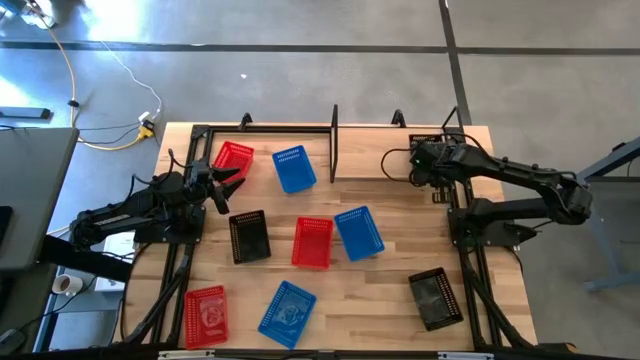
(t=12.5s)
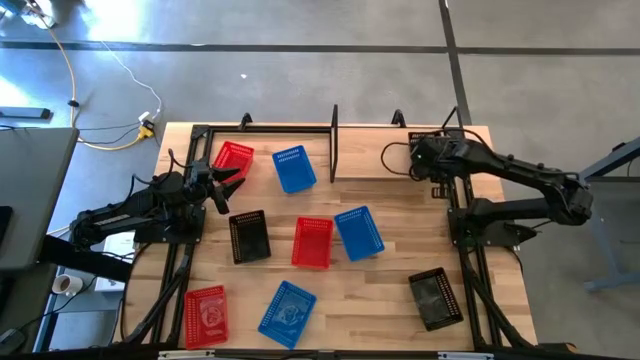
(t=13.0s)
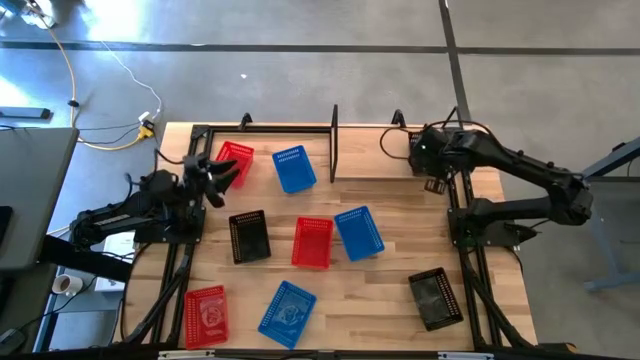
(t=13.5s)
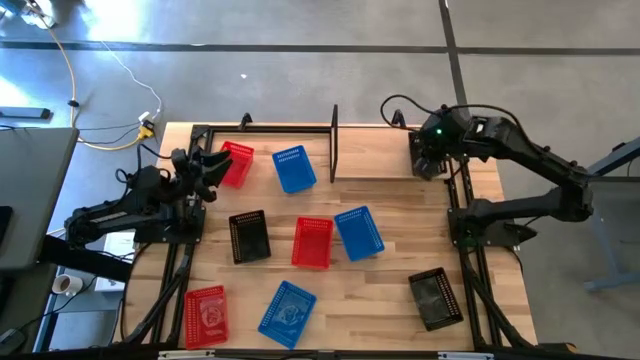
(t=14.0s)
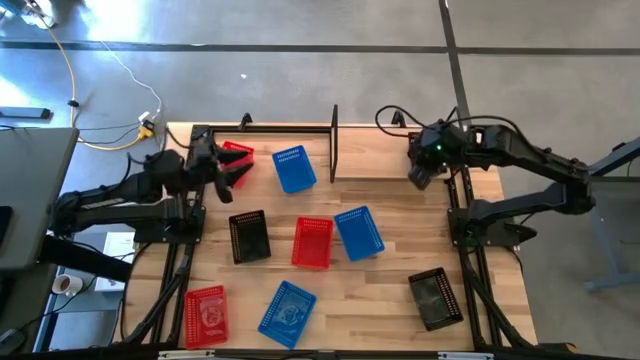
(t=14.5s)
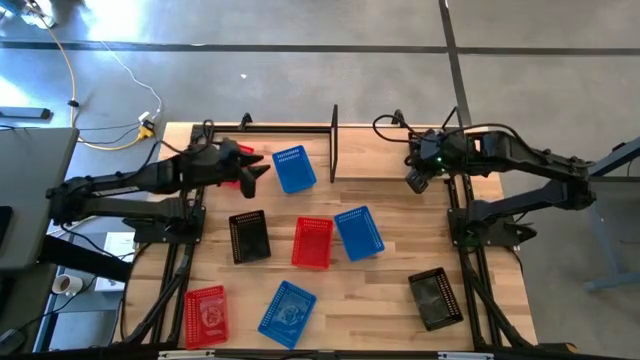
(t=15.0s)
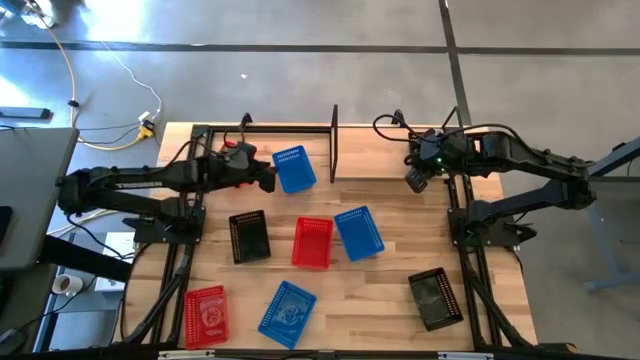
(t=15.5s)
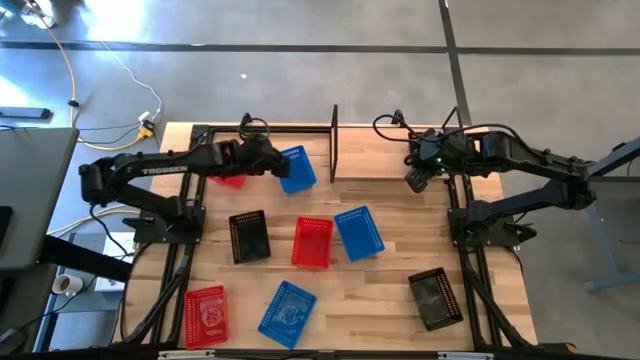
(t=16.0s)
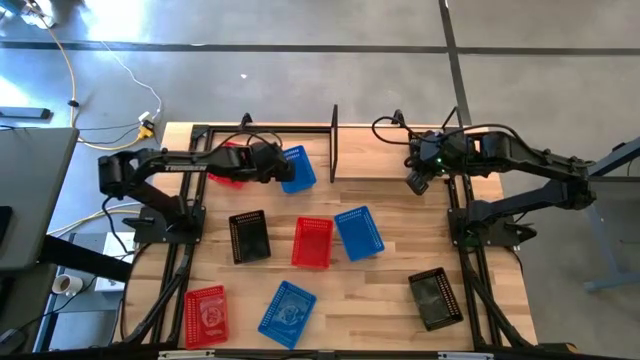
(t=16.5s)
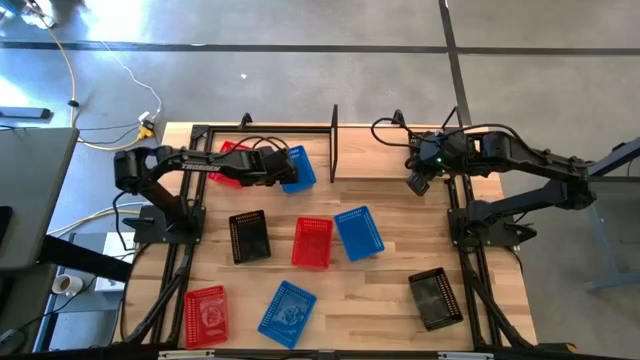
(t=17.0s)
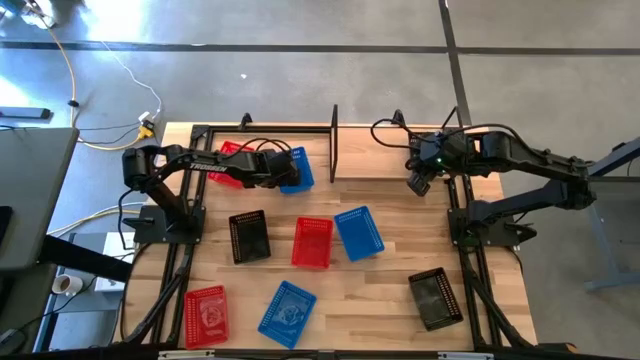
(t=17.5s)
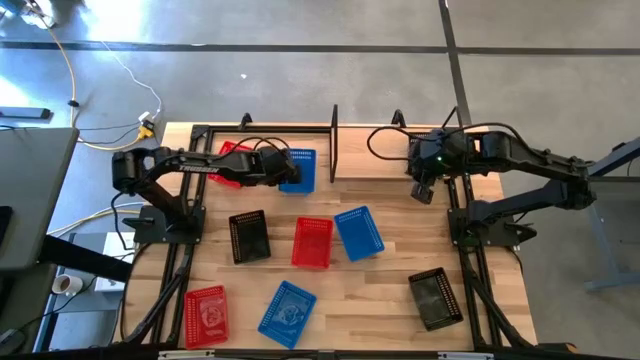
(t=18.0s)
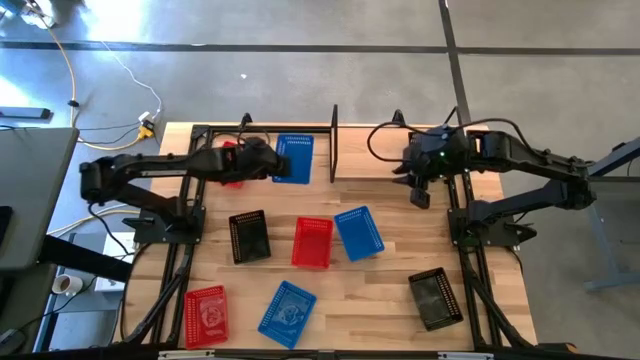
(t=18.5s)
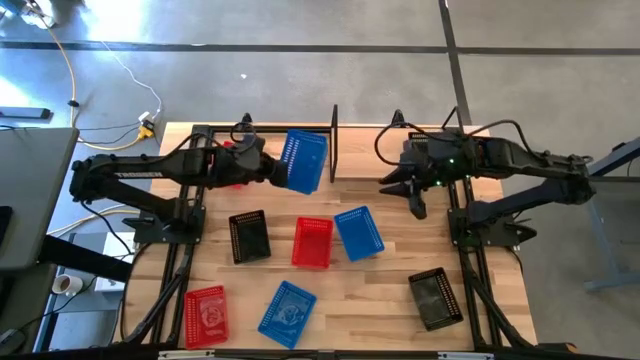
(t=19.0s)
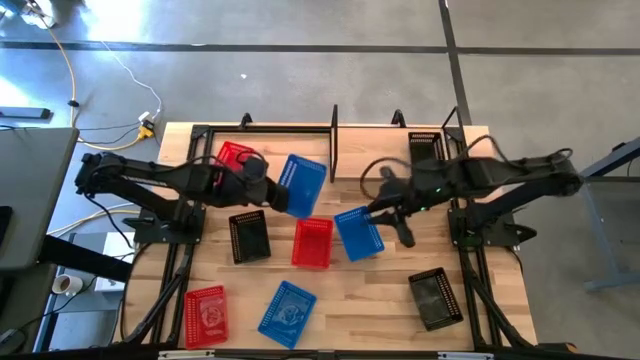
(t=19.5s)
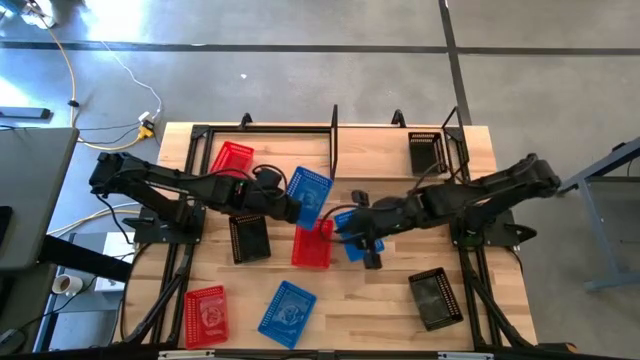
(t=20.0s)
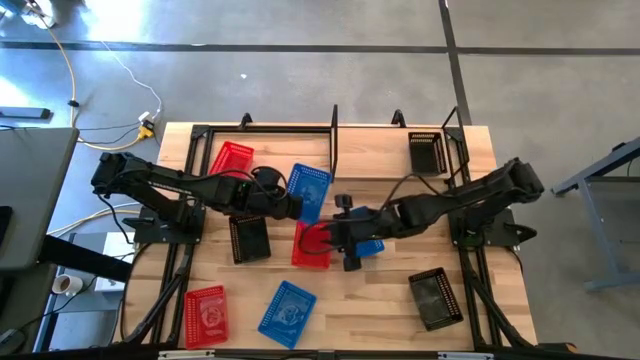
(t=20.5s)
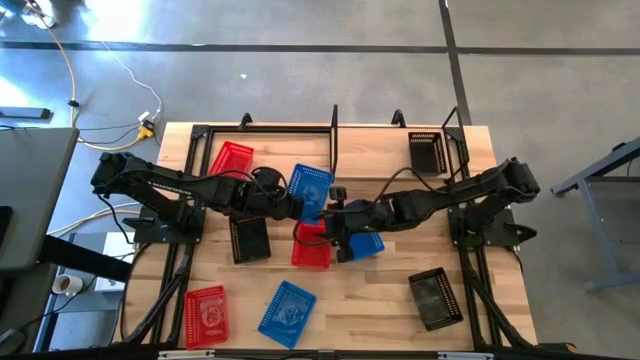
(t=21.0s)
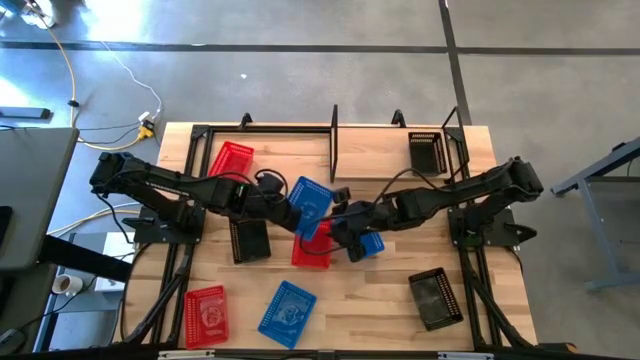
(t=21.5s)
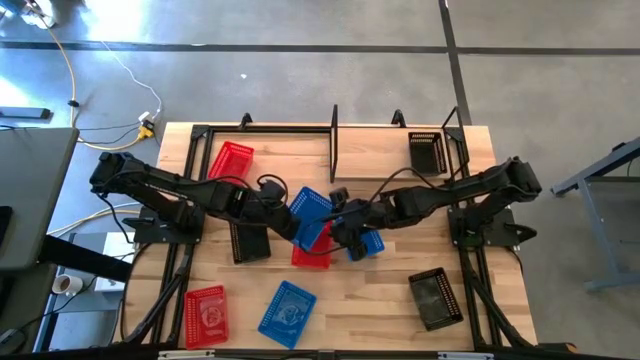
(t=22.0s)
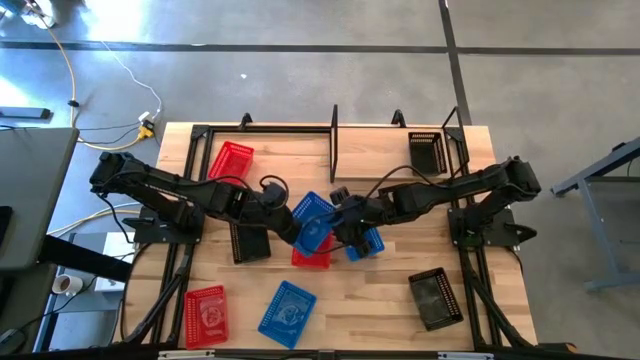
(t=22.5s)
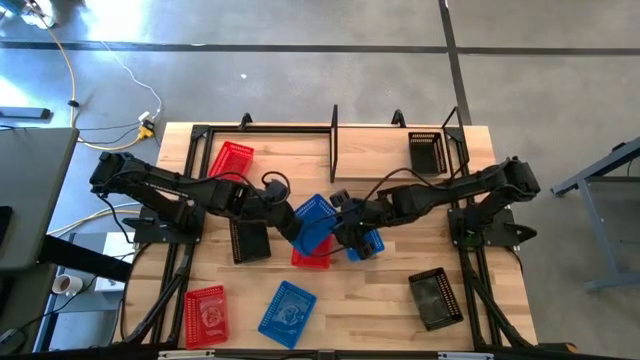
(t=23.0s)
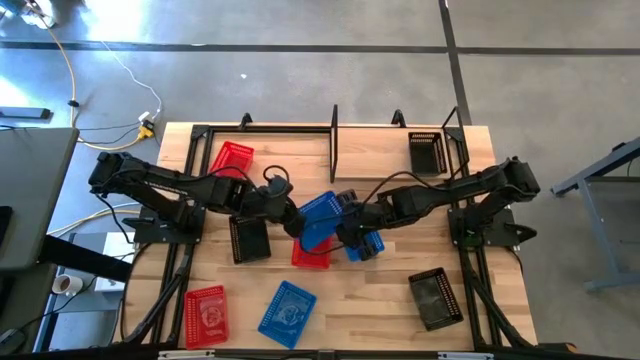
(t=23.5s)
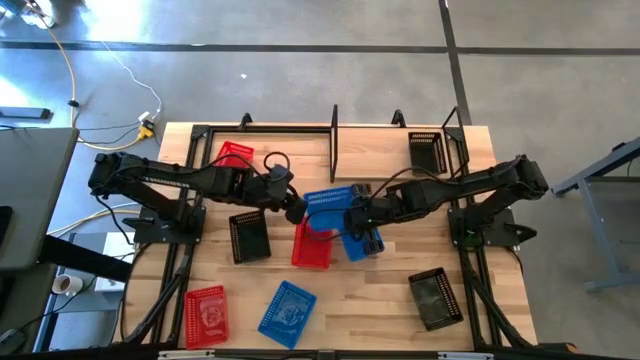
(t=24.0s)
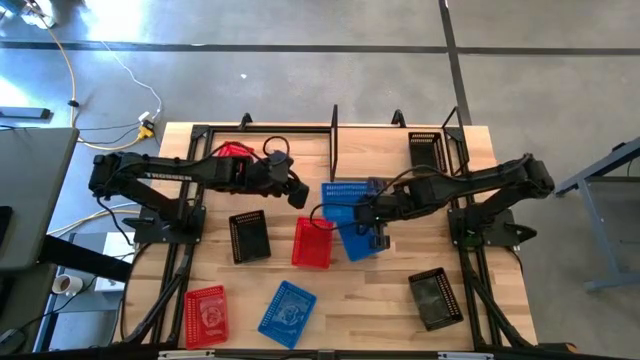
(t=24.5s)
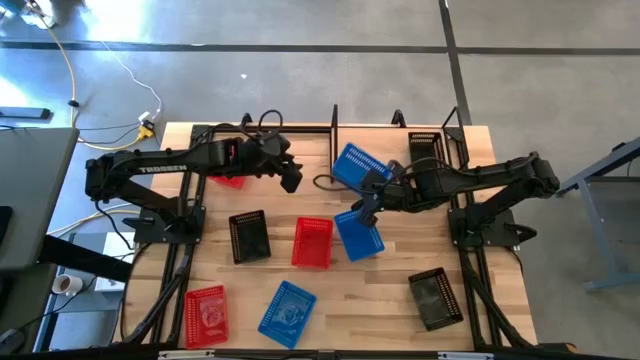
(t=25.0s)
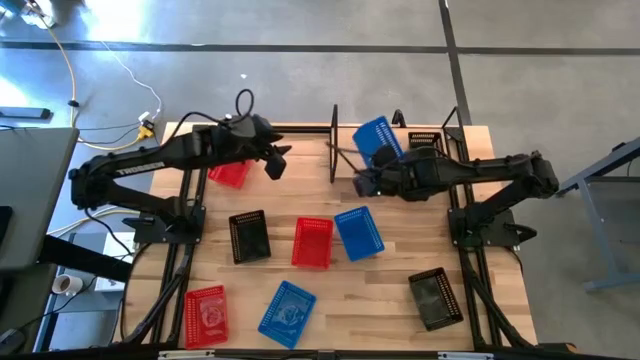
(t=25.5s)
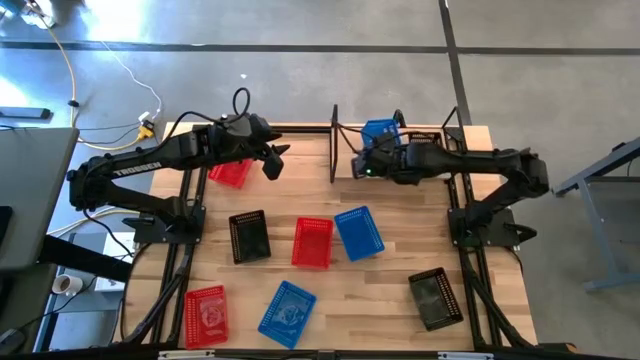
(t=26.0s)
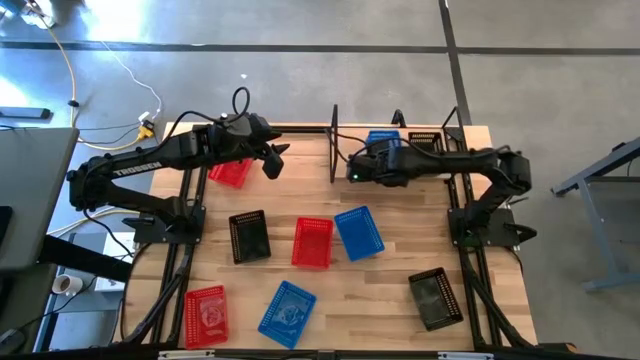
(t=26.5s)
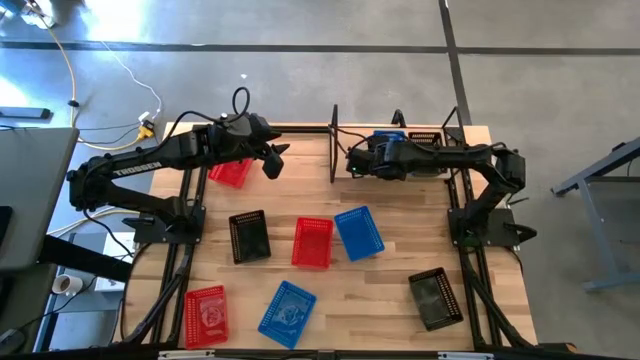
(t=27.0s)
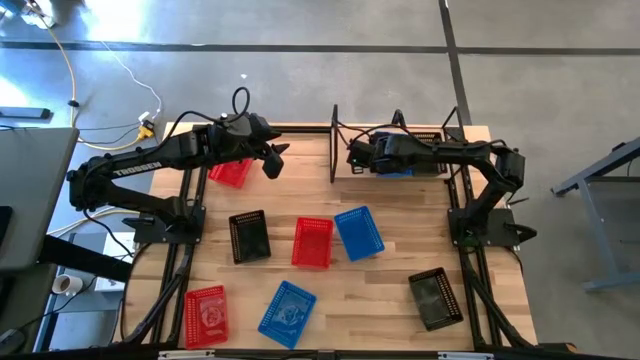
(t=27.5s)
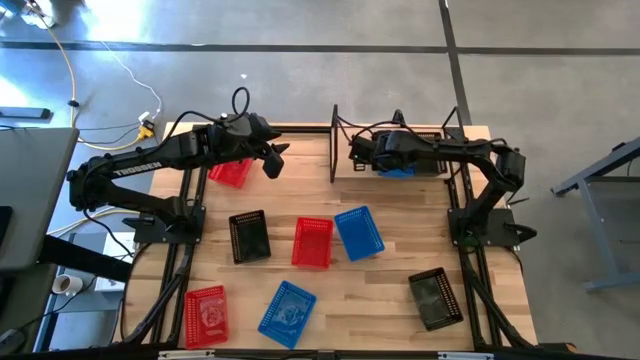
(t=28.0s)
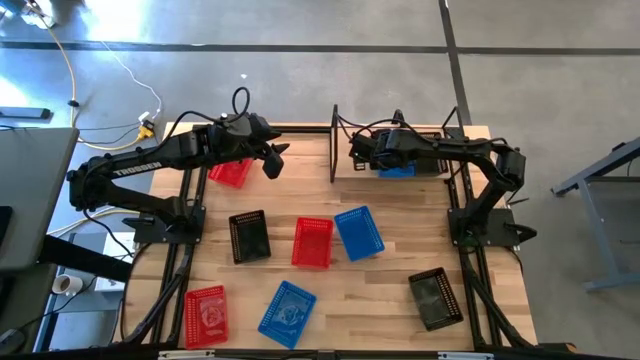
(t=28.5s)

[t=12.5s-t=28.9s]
Task: Stack baskets on shelf by color
Put the top blue basket on the shelf
